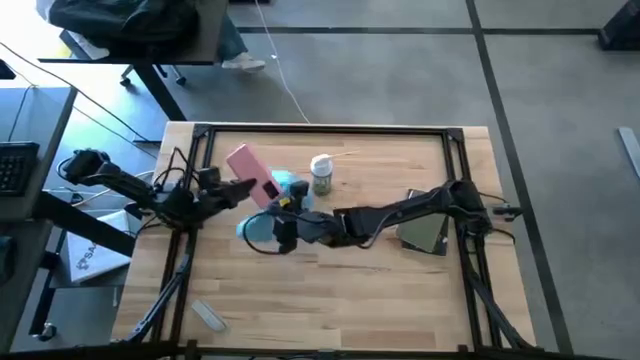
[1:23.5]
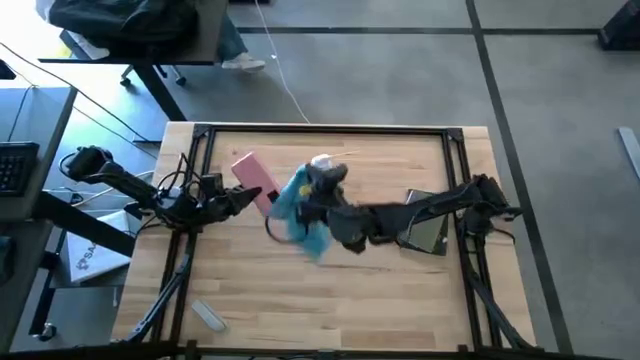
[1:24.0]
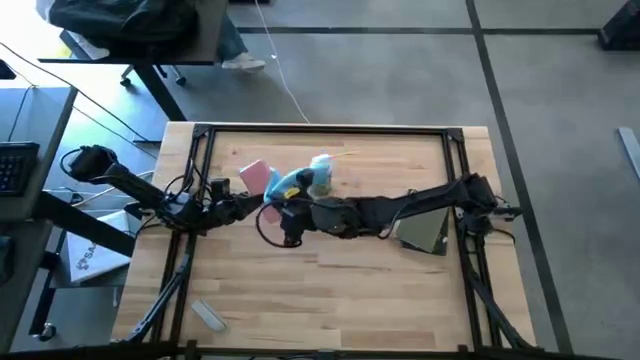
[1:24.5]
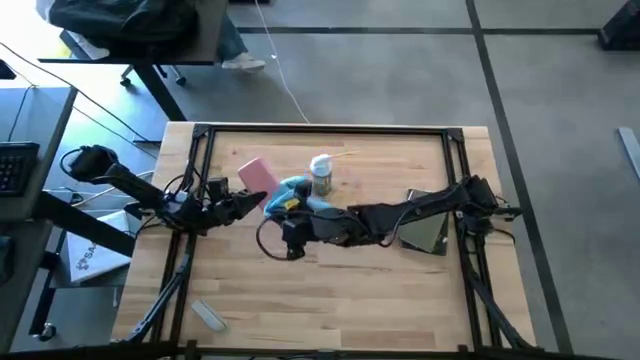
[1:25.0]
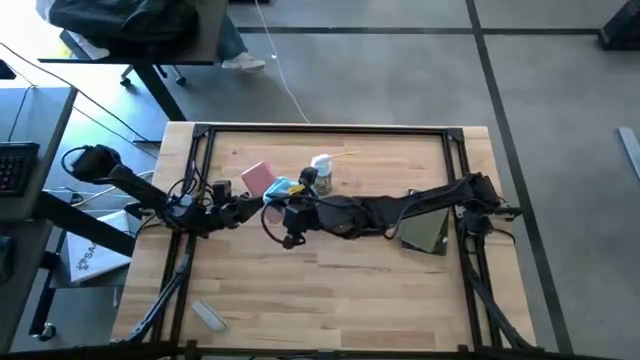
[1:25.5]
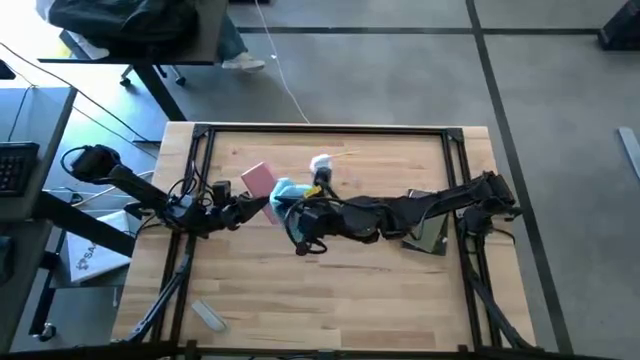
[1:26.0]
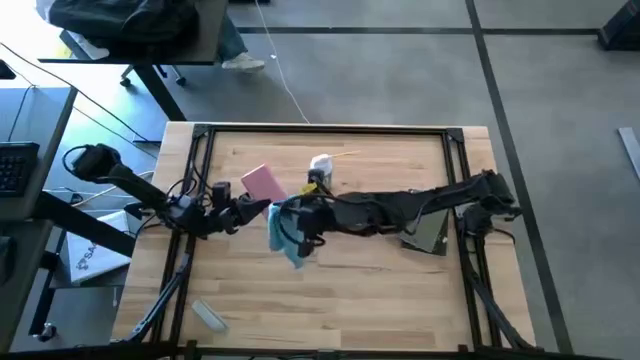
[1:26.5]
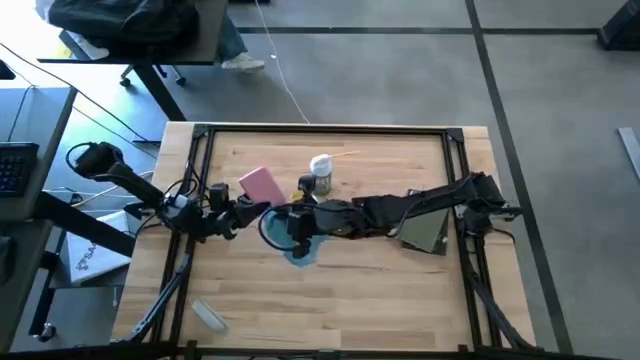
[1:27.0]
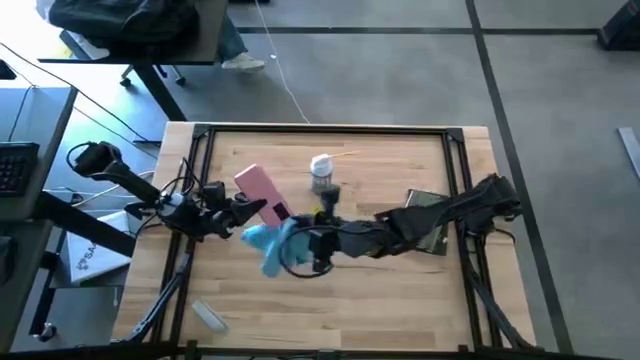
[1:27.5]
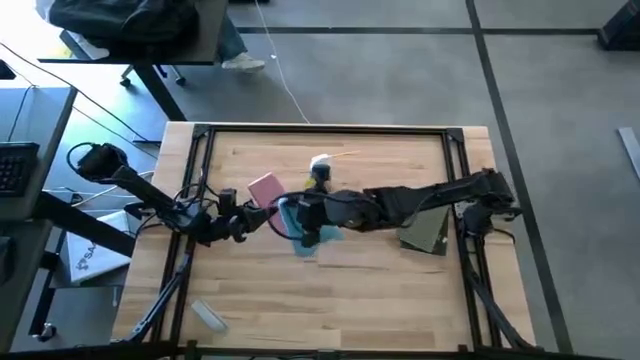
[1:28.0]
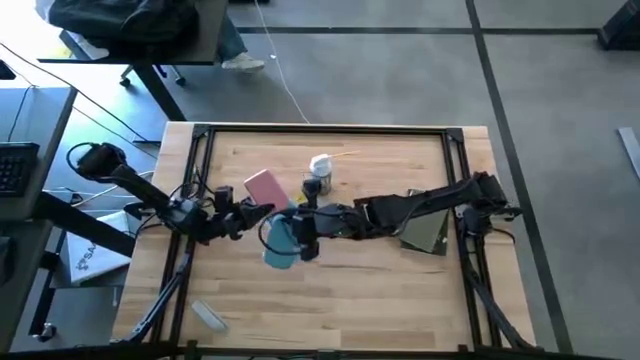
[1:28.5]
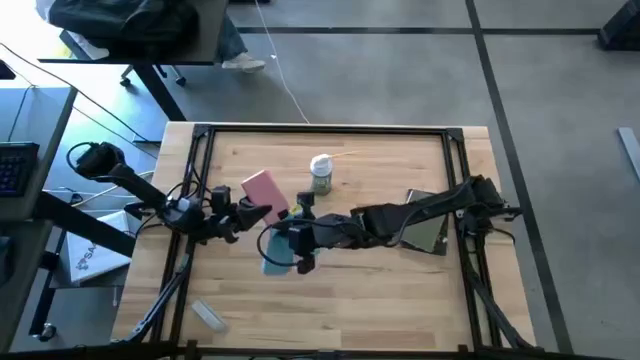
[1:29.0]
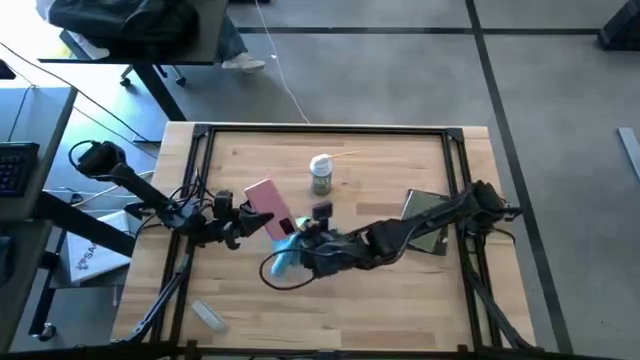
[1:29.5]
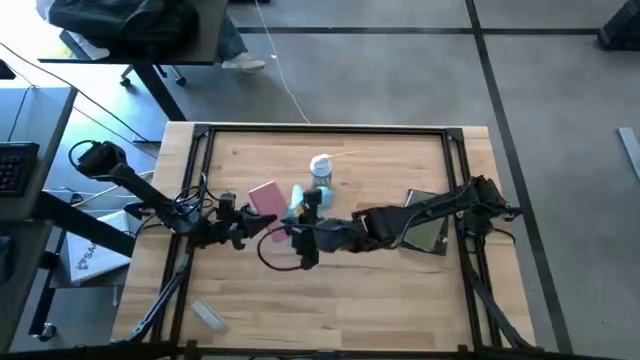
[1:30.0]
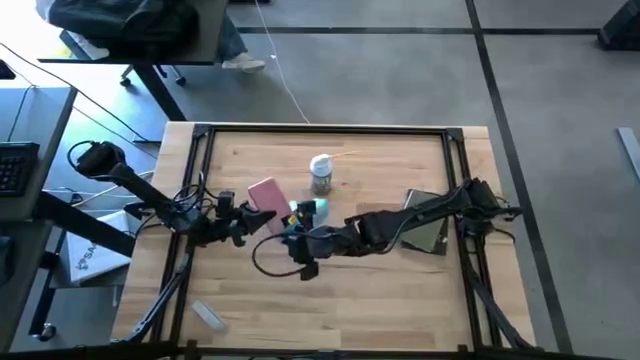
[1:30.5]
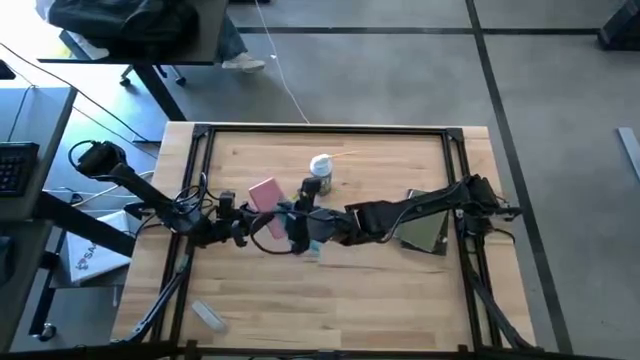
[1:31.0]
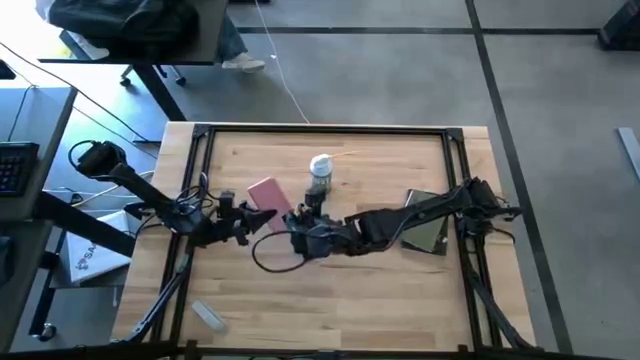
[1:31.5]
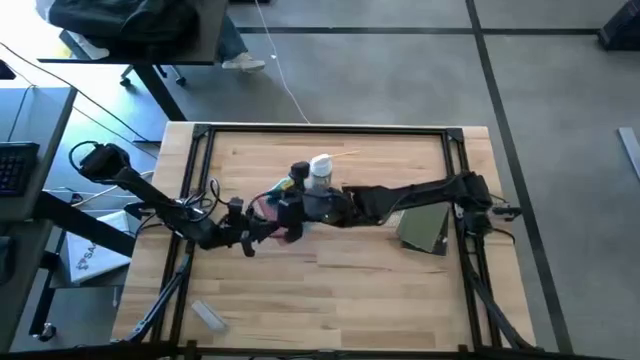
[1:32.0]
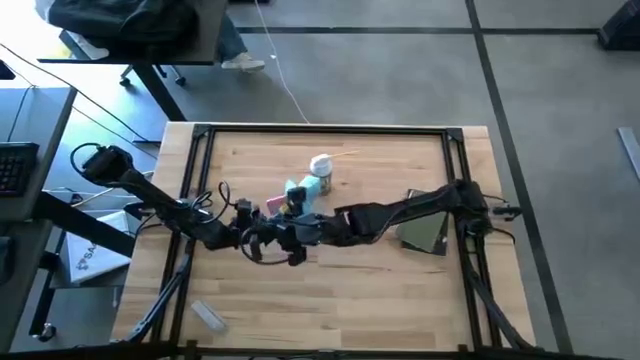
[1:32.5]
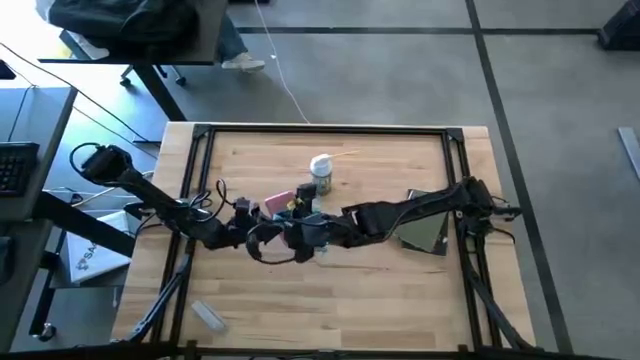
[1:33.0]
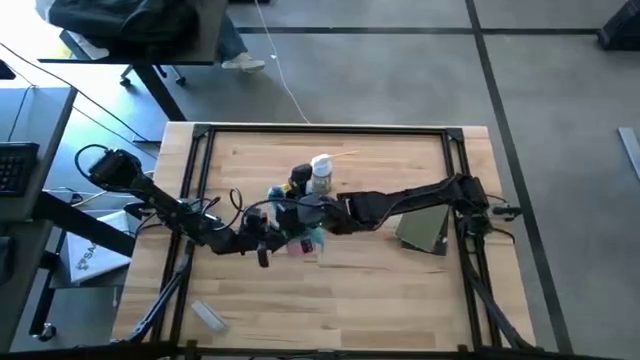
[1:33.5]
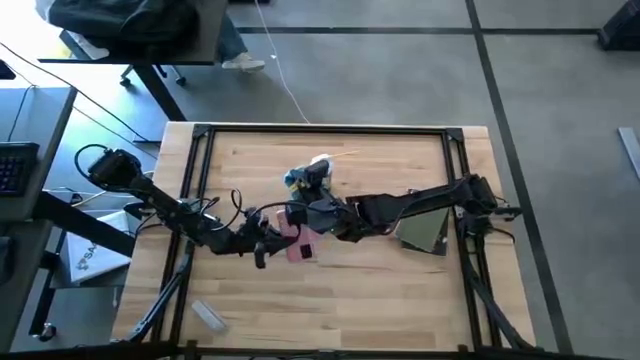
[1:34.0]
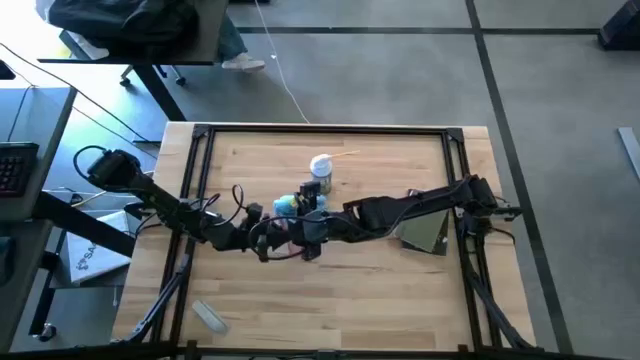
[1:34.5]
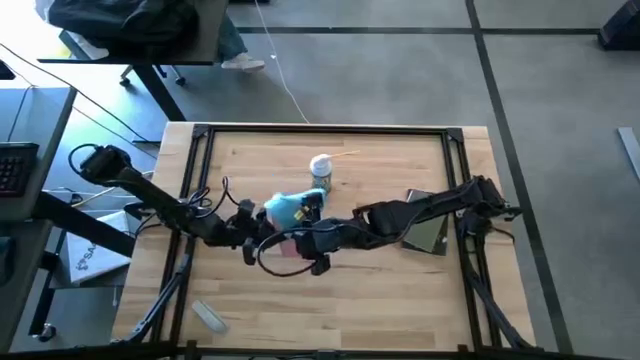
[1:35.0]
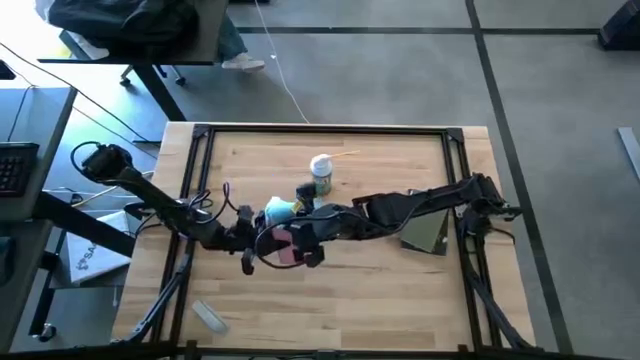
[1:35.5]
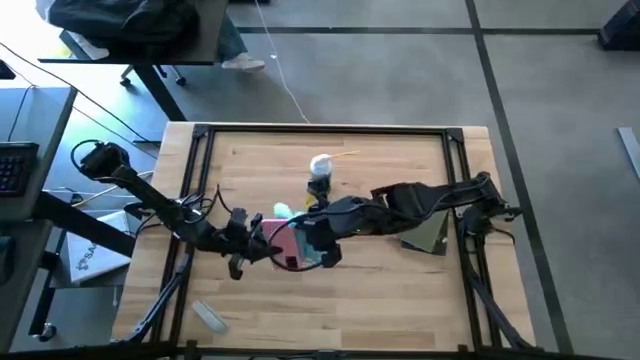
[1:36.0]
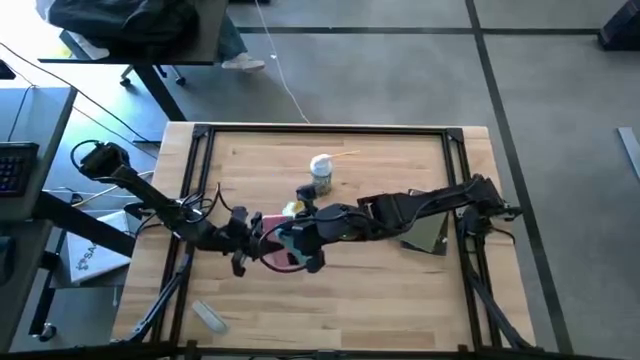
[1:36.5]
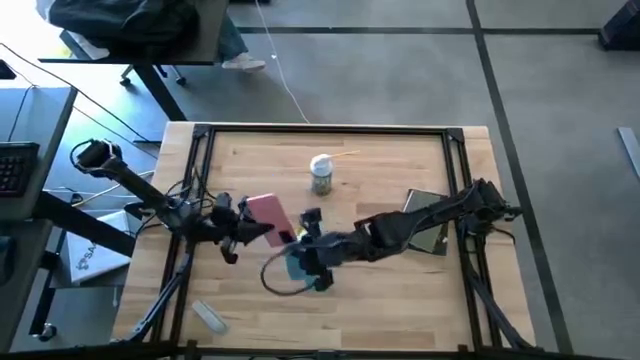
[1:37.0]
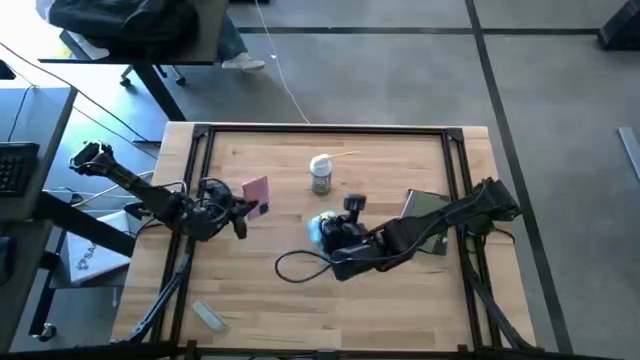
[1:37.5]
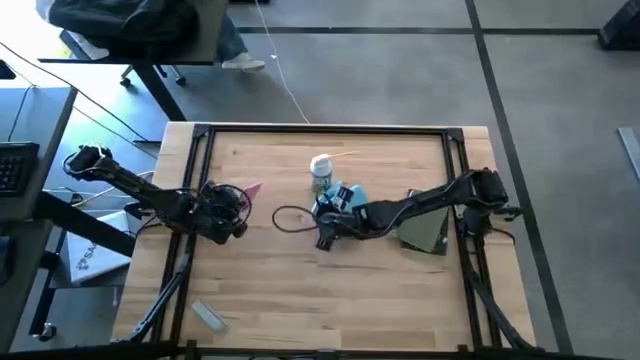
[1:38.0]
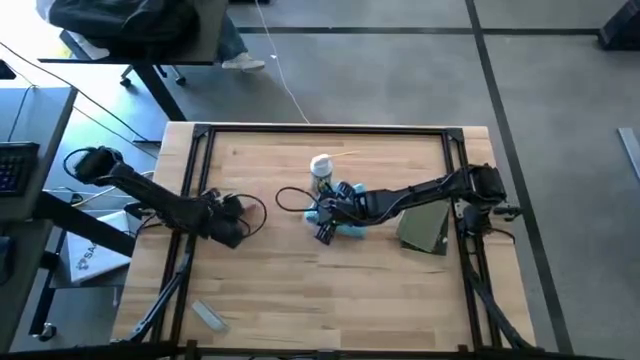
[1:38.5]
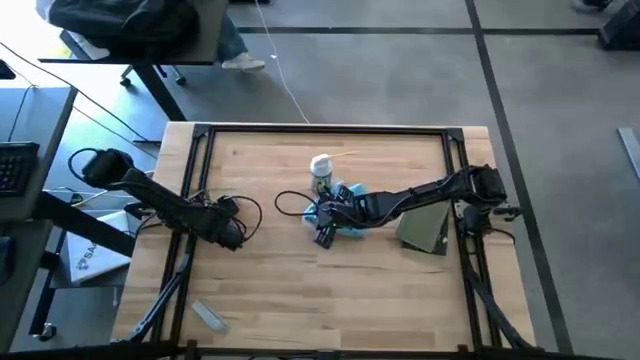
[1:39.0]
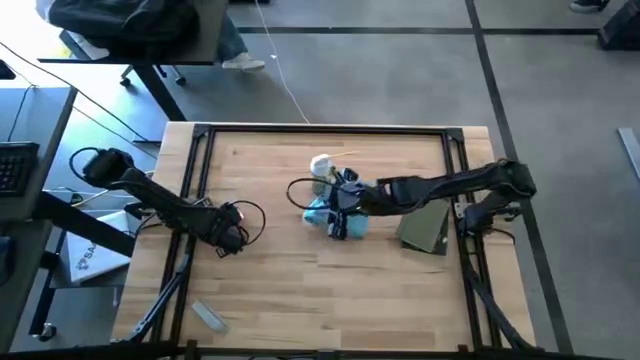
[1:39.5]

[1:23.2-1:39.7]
Task: Apply microfiber cloth
Wipe the front and back of the pink cellphone with a blue microfiber cloth

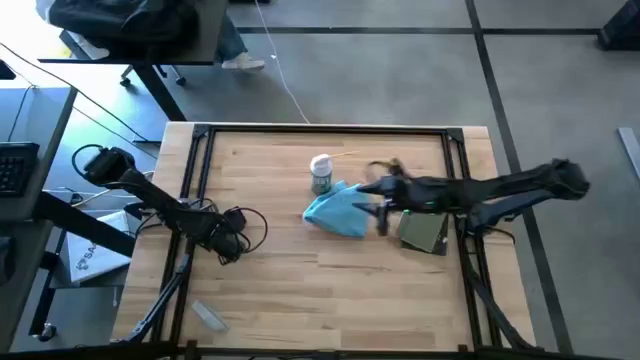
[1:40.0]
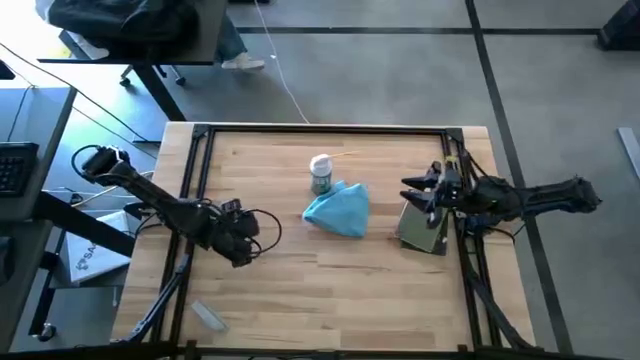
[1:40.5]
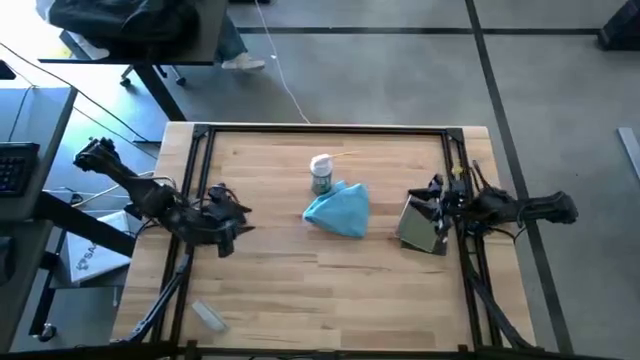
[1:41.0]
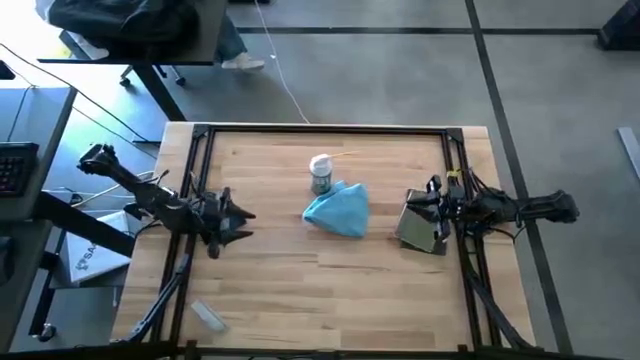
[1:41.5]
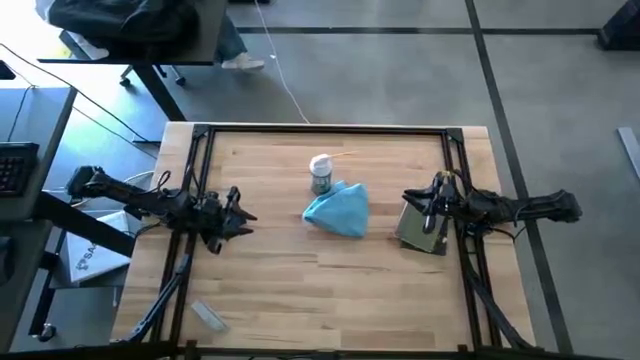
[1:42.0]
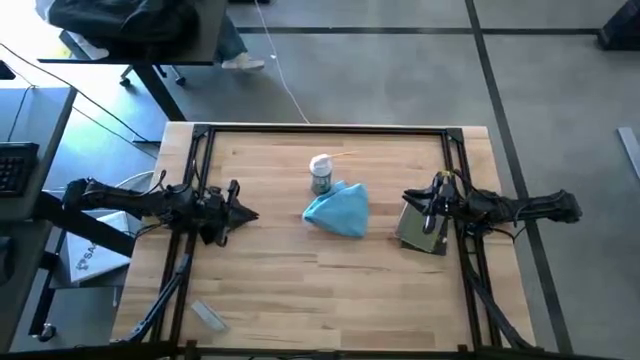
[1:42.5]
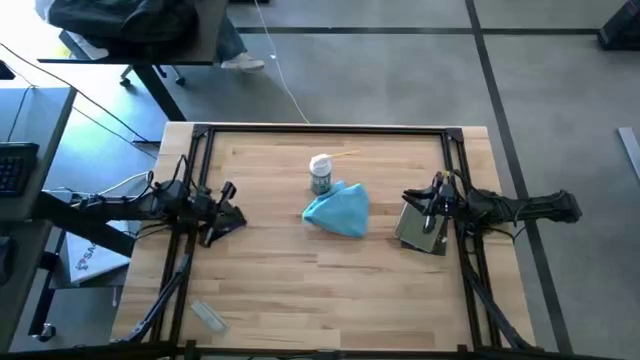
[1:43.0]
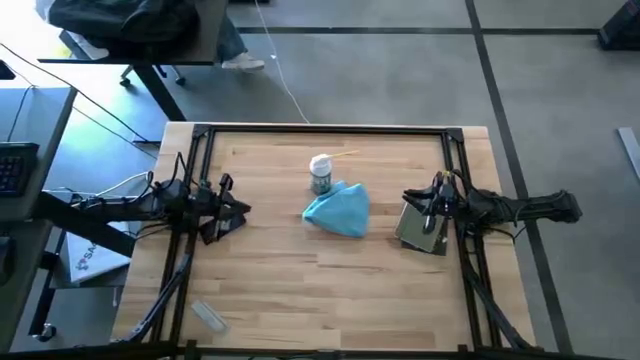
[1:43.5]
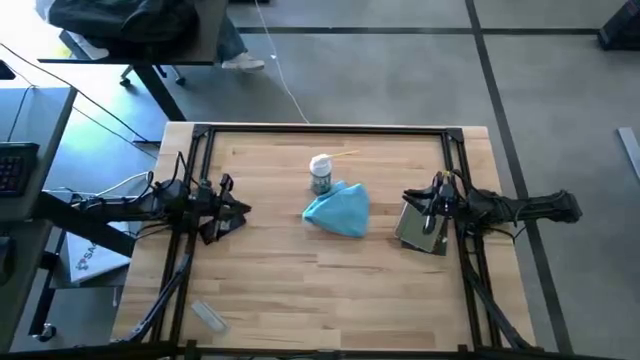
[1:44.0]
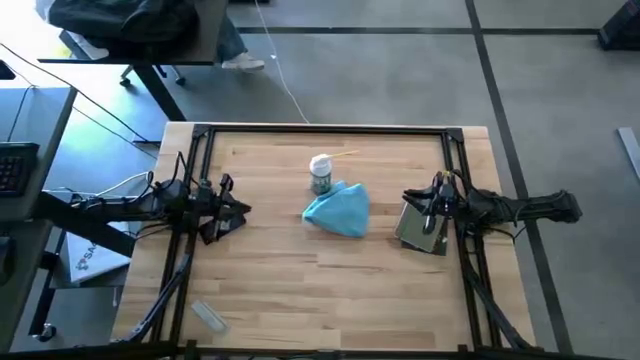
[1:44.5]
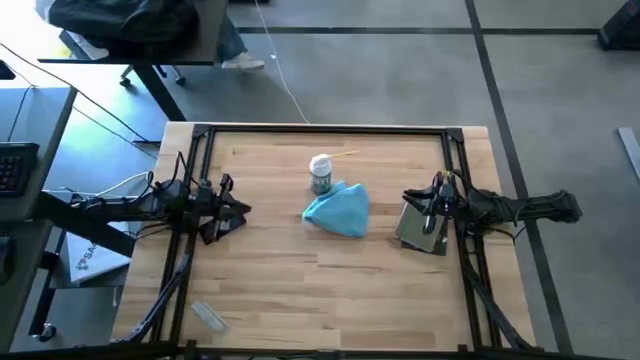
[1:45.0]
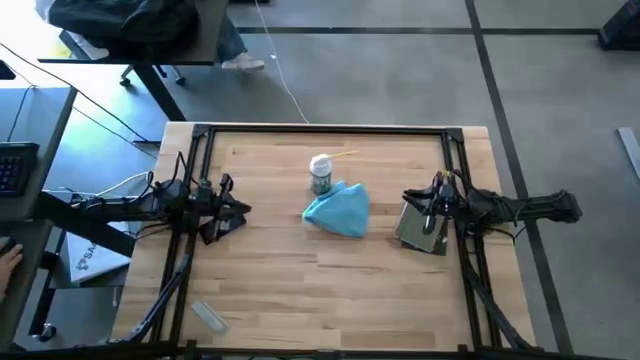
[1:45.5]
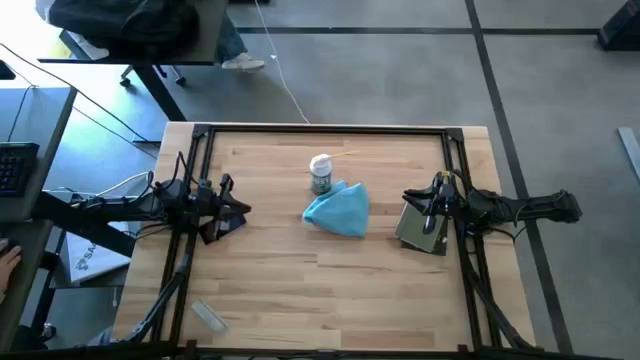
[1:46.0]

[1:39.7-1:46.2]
Return to Home Position
